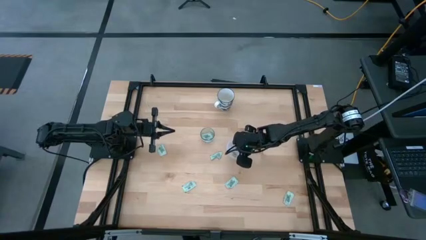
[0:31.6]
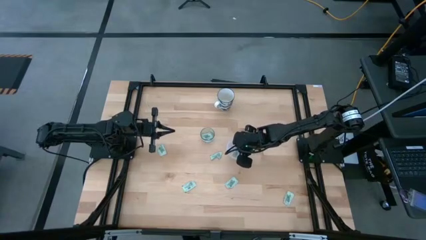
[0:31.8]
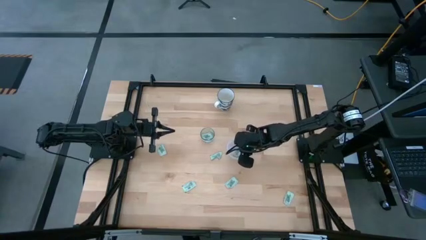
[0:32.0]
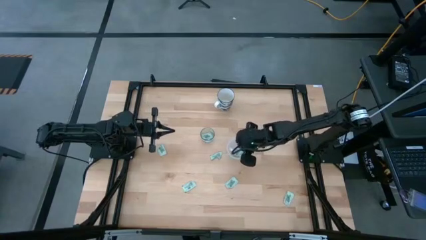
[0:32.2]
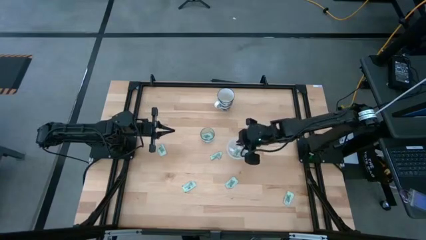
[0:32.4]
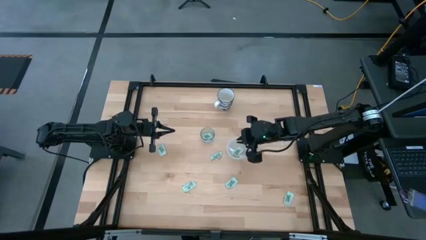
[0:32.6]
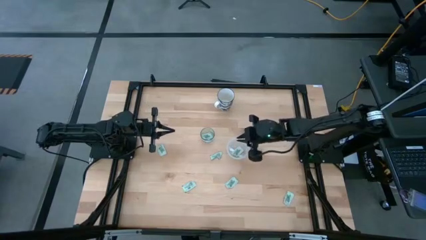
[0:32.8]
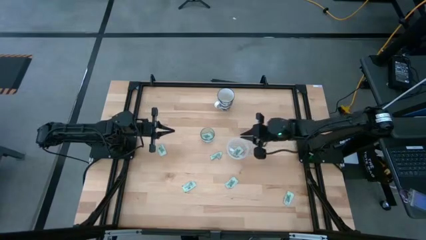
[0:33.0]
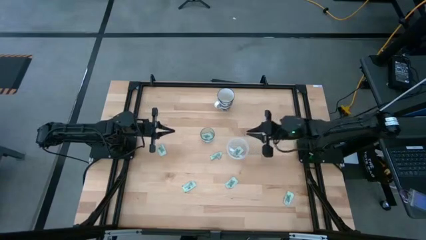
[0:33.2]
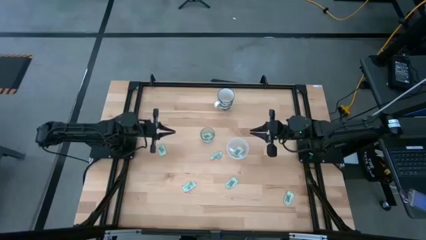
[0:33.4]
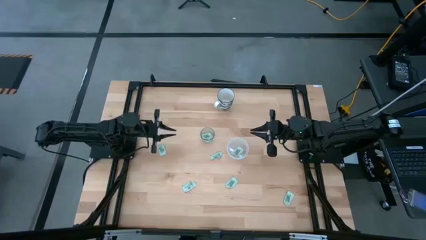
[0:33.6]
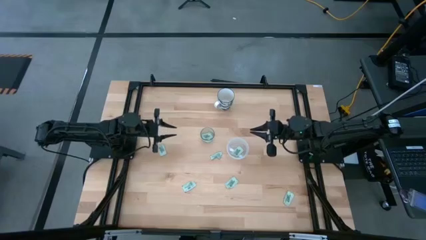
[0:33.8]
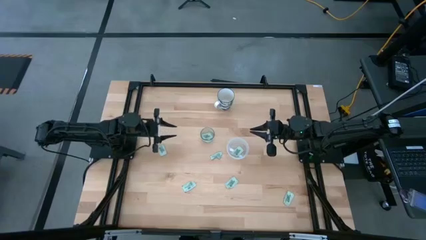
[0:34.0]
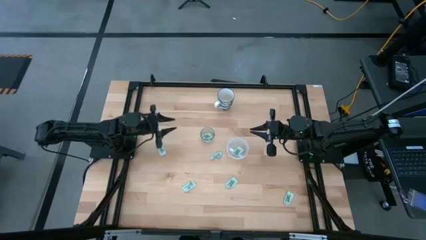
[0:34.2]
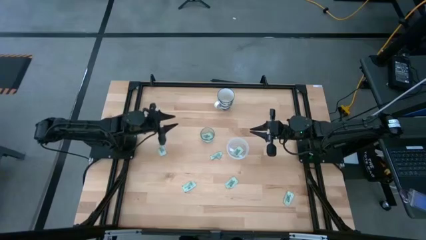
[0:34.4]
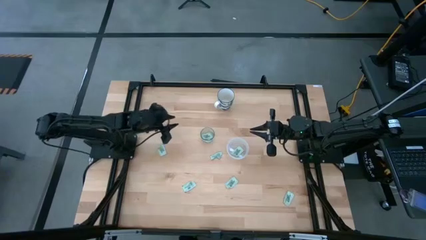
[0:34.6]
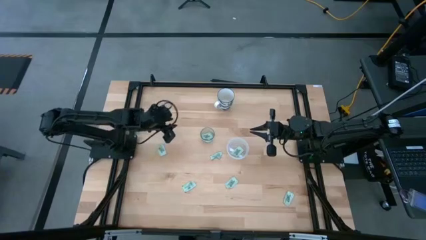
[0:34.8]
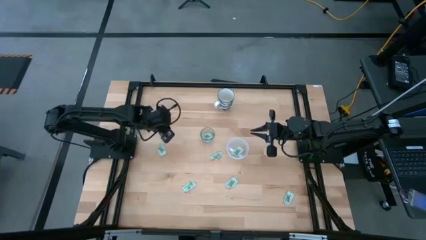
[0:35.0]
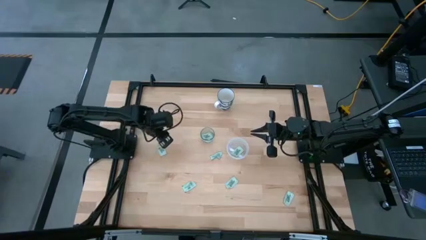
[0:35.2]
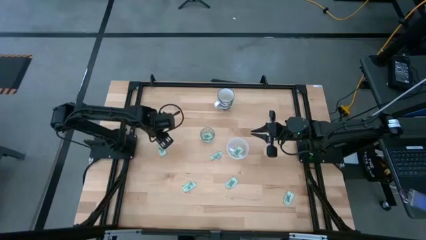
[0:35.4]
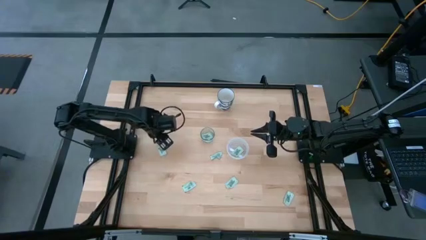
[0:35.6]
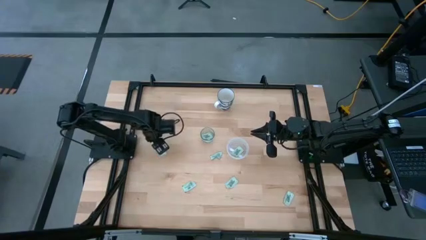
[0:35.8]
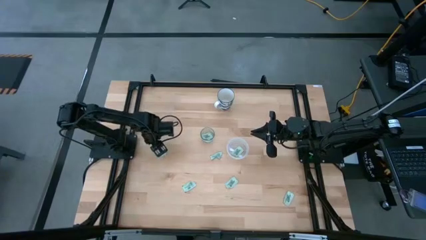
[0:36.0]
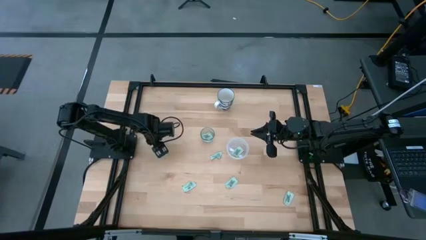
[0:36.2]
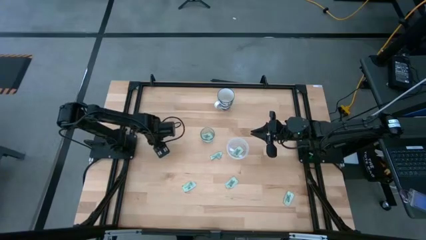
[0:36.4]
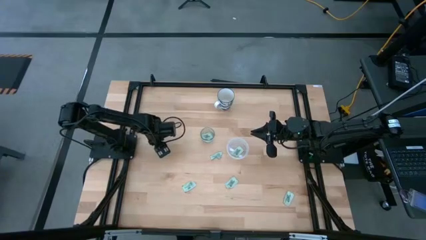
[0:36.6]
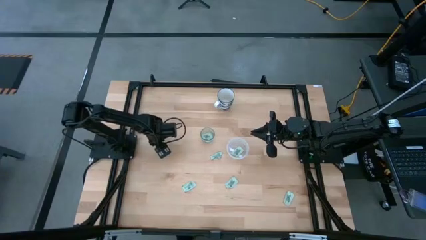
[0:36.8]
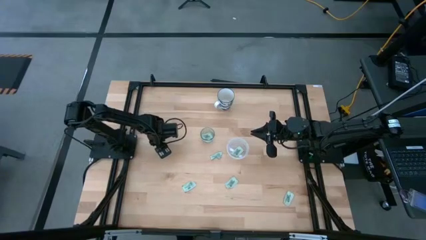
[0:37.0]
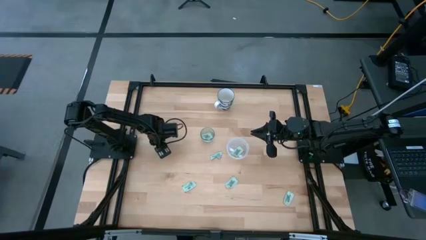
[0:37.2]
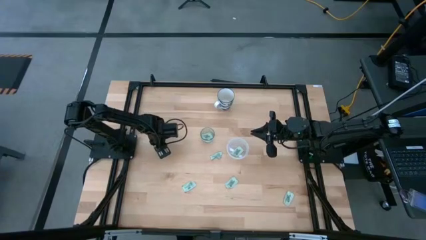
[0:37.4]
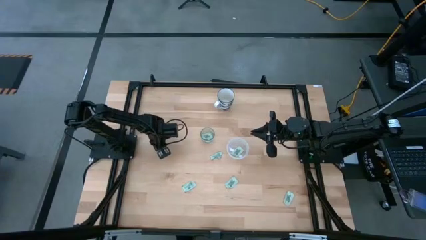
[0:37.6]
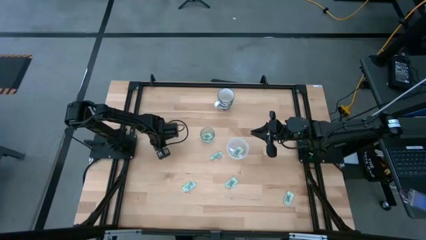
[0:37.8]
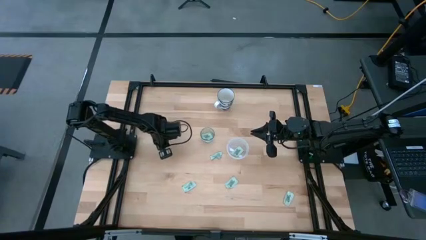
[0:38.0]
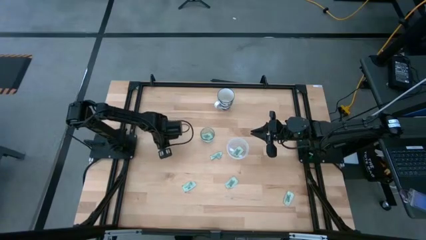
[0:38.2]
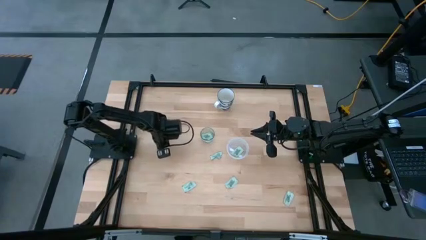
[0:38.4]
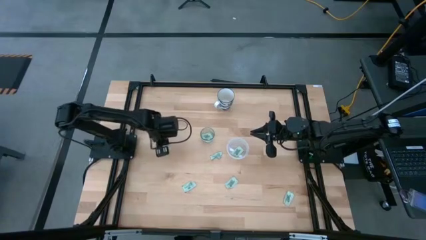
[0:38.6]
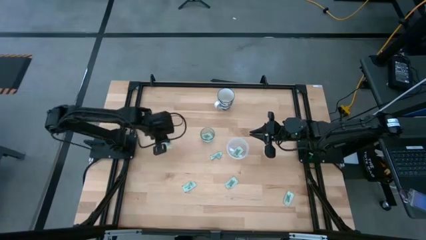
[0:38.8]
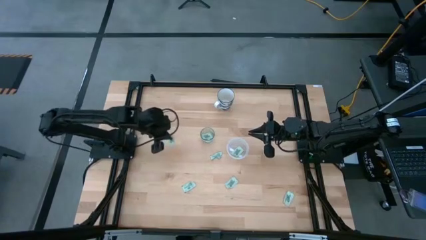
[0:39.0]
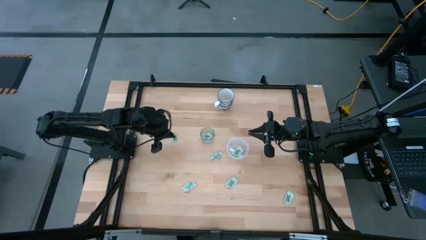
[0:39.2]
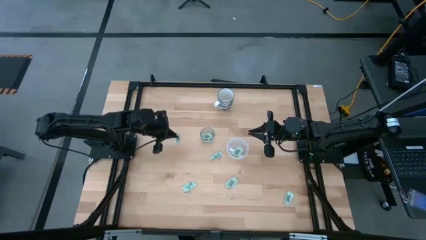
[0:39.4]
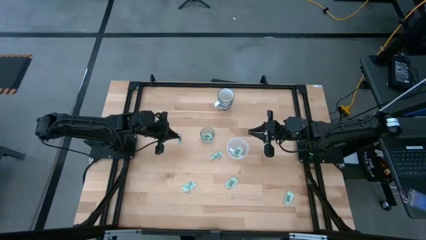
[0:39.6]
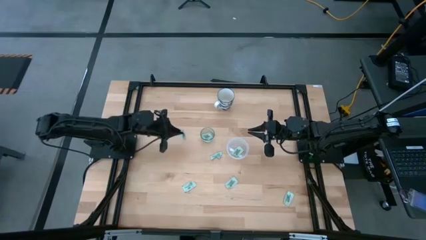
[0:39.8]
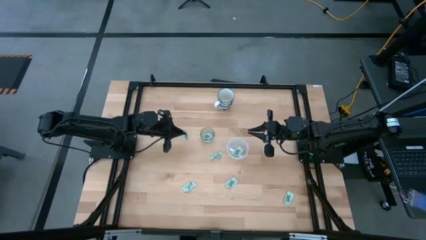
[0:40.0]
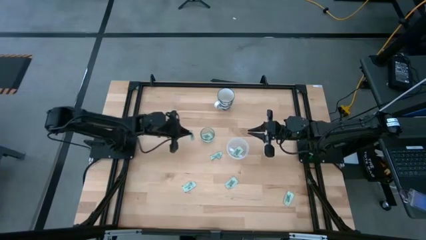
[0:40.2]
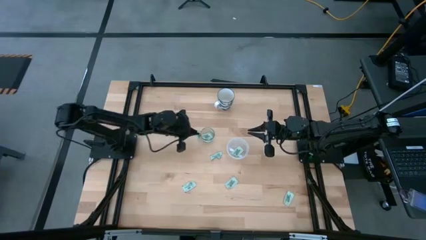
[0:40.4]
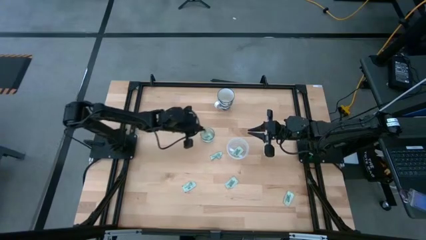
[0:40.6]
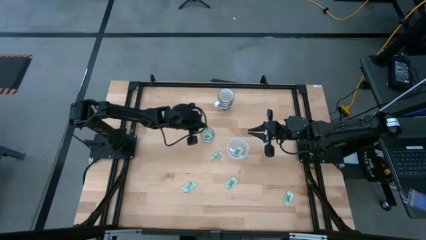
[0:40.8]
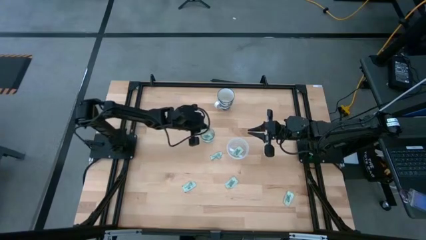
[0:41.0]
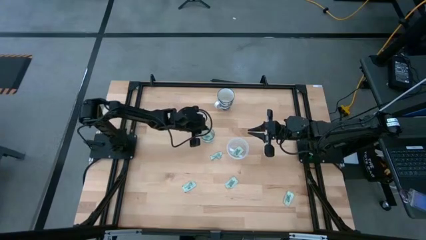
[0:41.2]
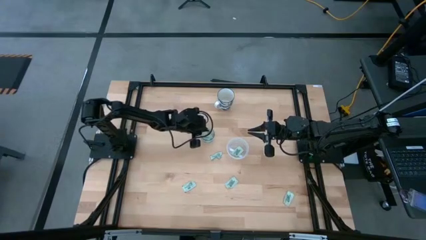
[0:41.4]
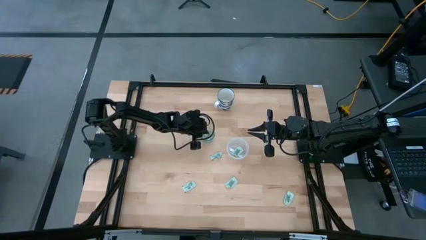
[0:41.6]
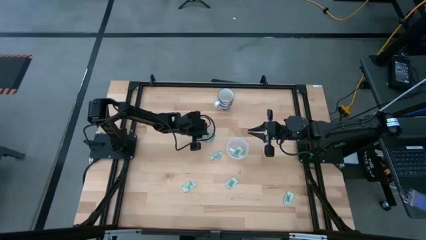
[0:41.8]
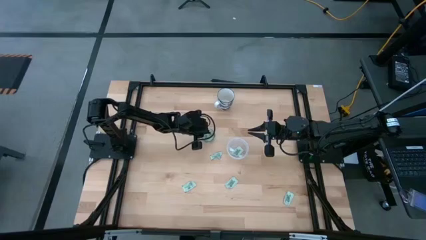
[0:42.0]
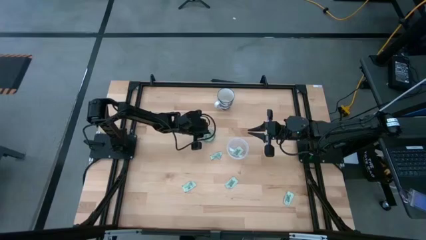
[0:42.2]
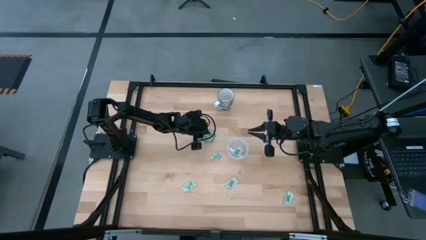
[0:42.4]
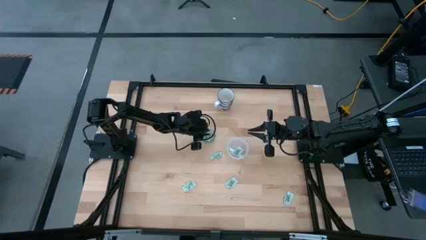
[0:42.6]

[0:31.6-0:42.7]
Task: Pick and place Stevia / Truvia into bins
Put the stevia packet into the glass container

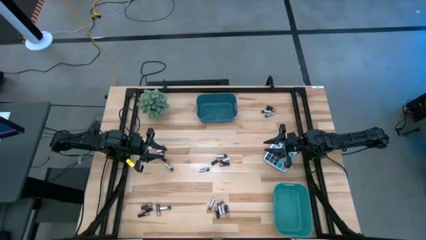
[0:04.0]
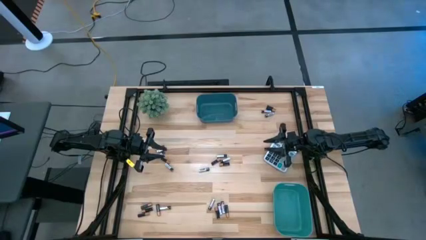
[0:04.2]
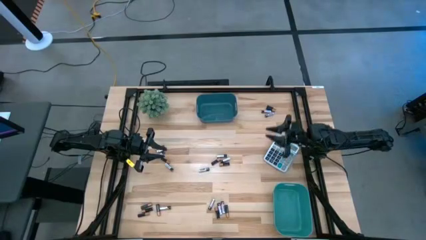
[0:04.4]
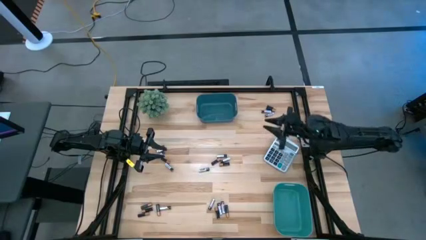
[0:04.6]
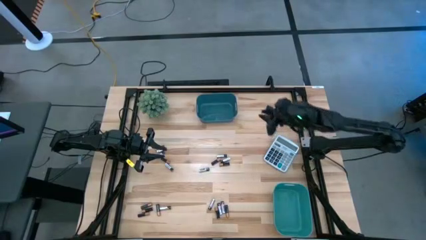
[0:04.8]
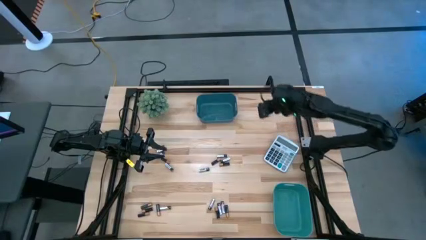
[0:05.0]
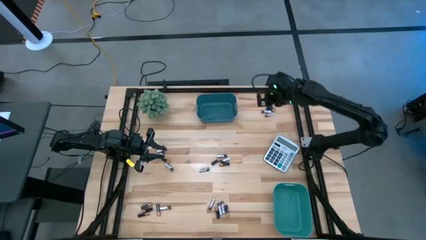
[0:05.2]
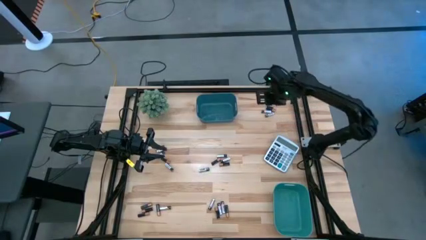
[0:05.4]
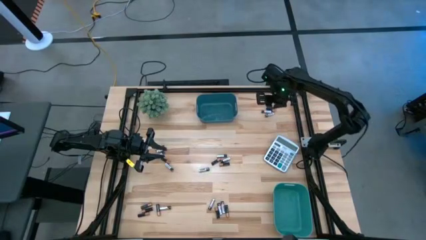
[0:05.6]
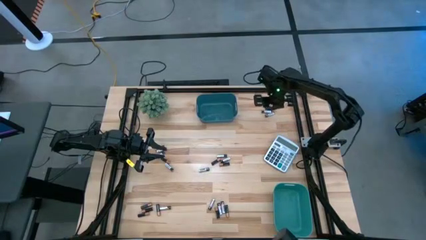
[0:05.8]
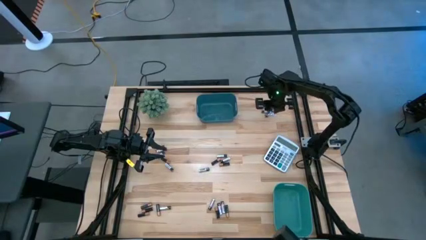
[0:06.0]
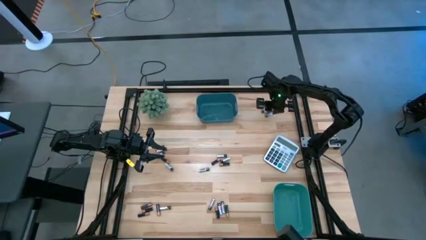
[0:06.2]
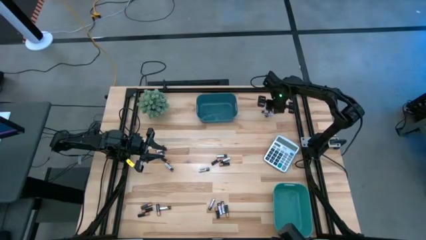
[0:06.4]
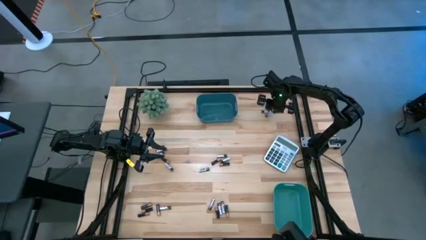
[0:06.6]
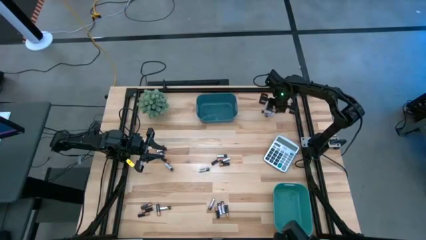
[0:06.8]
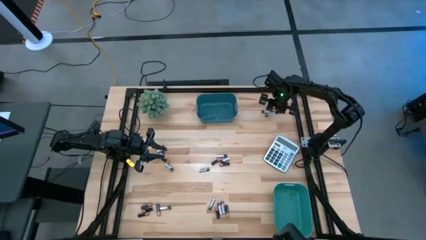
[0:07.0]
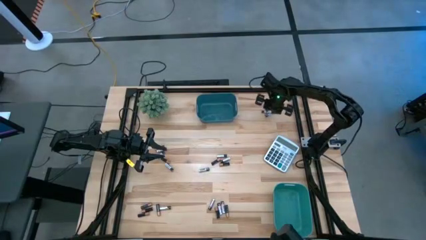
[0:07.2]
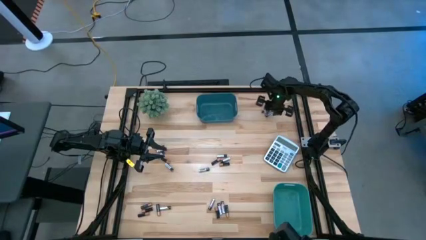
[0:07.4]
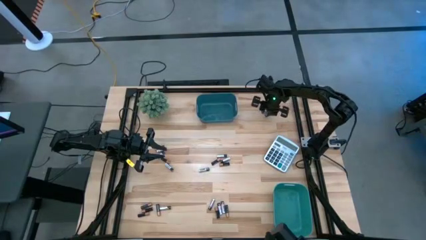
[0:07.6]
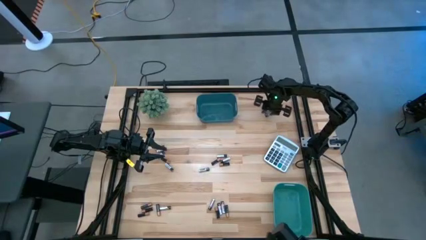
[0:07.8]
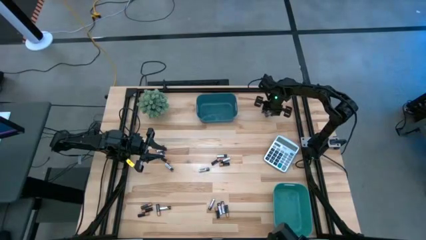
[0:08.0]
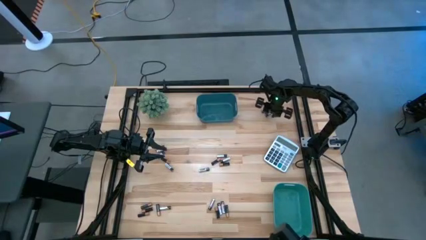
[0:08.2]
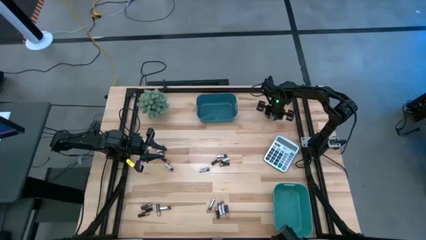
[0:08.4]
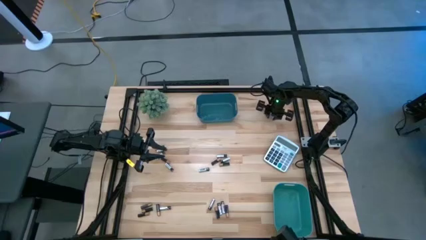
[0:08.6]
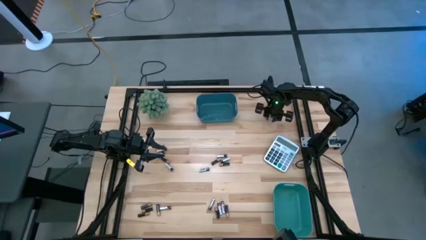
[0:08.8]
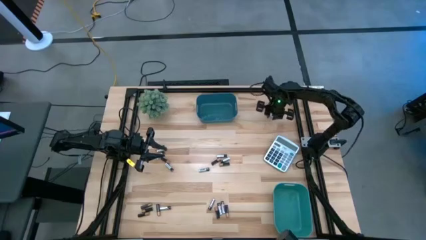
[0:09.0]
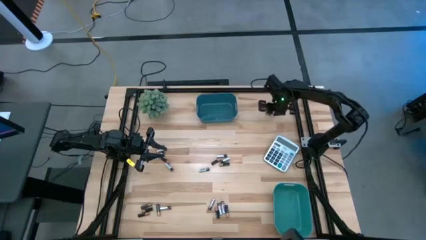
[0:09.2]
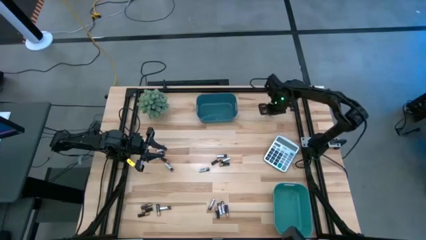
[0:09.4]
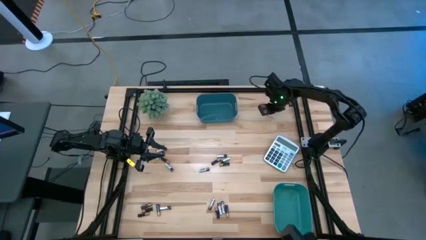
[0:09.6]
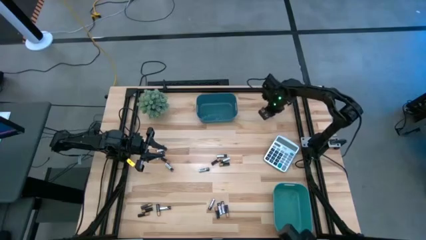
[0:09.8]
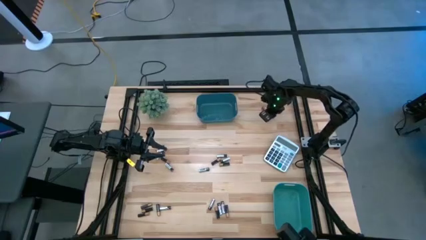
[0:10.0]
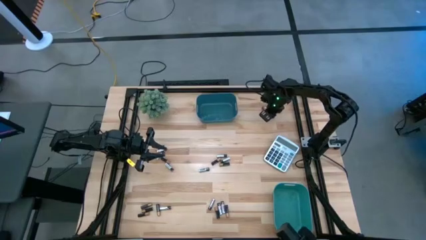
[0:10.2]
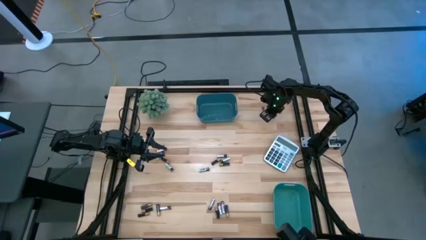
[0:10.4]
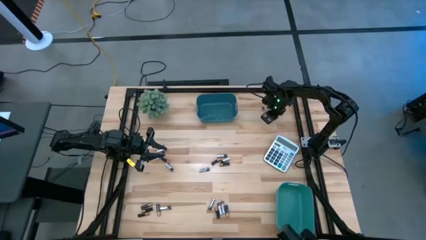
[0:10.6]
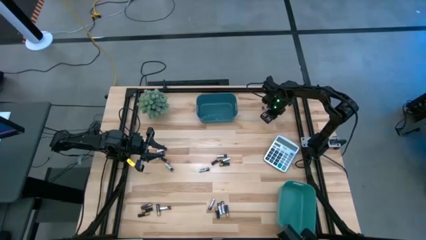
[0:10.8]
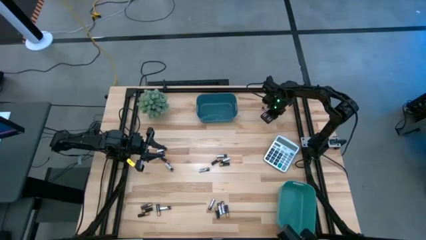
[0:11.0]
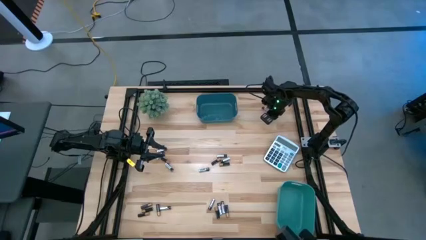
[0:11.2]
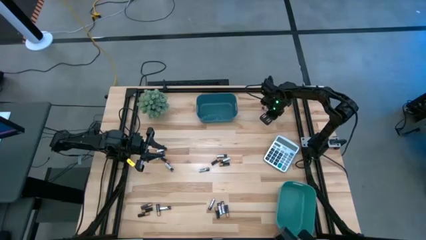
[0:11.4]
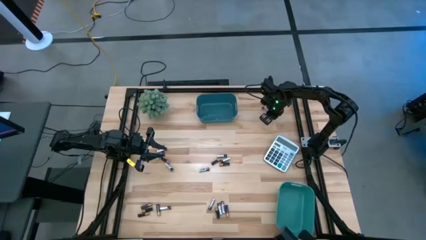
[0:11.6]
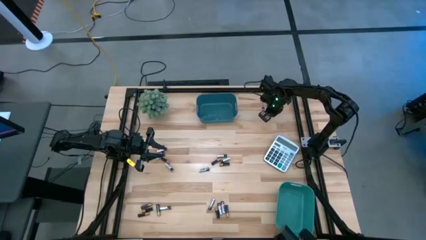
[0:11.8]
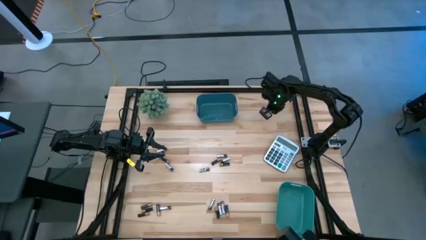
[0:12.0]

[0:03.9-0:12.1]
Task: Sort batteries
Put the silver battery into the green bin
